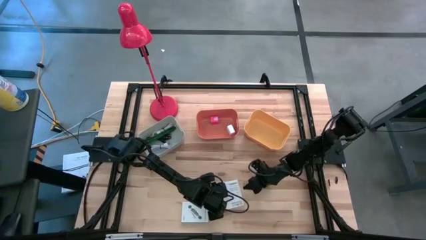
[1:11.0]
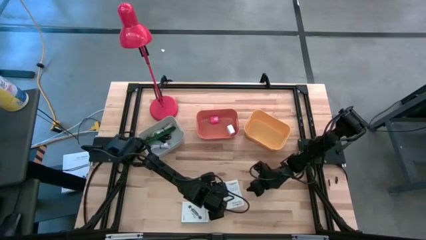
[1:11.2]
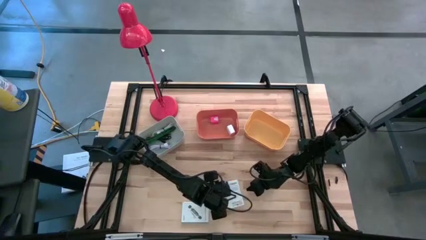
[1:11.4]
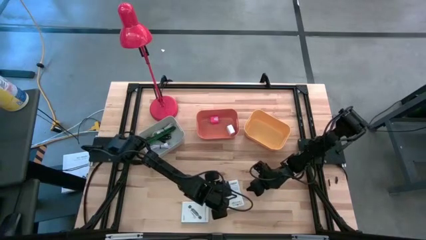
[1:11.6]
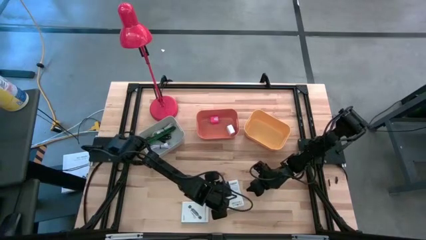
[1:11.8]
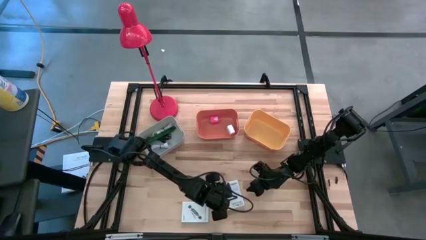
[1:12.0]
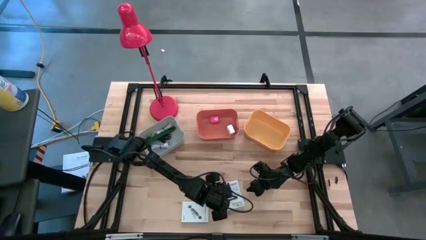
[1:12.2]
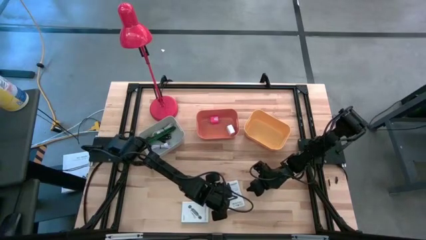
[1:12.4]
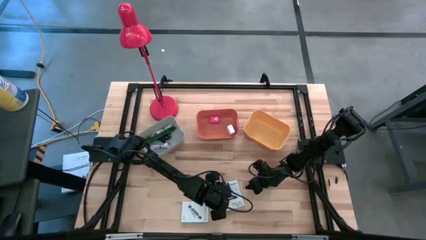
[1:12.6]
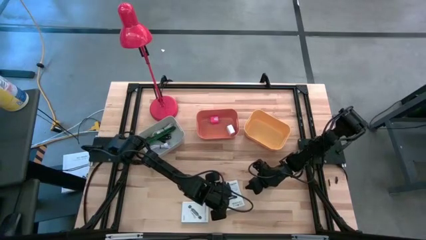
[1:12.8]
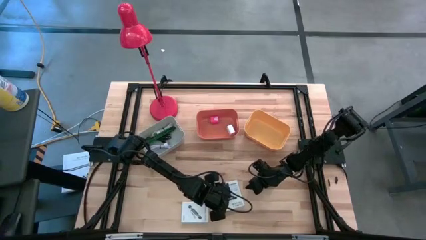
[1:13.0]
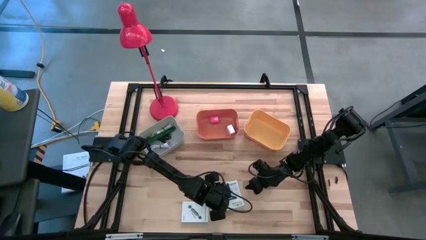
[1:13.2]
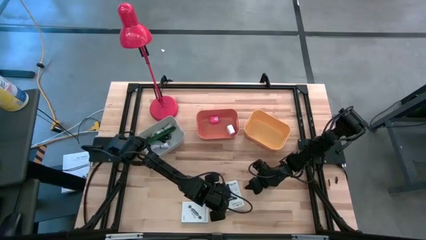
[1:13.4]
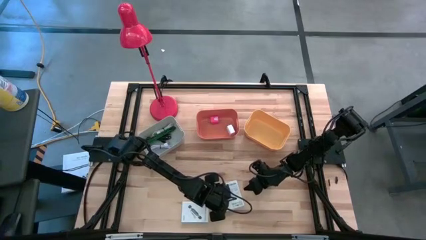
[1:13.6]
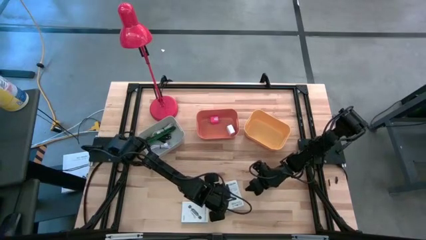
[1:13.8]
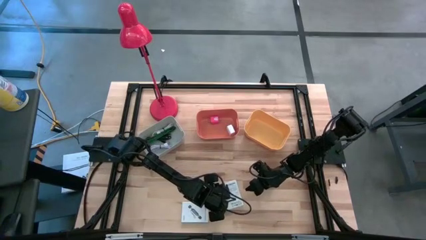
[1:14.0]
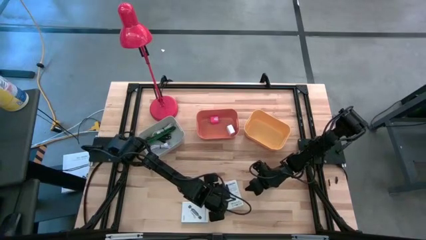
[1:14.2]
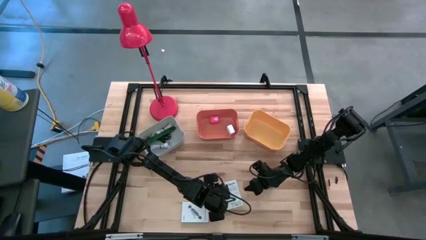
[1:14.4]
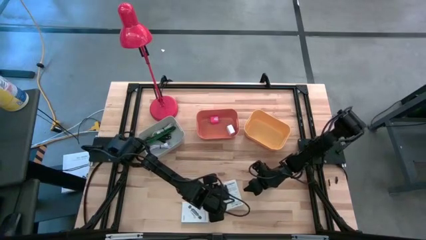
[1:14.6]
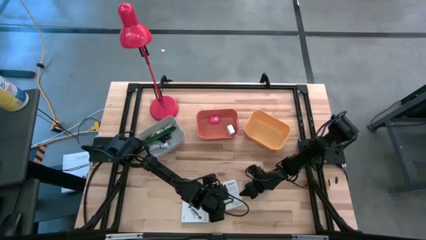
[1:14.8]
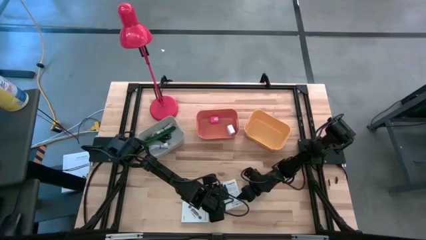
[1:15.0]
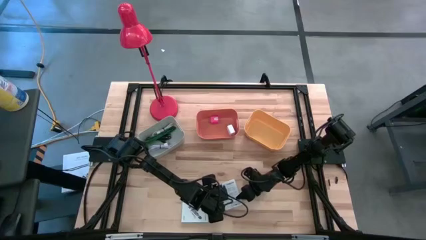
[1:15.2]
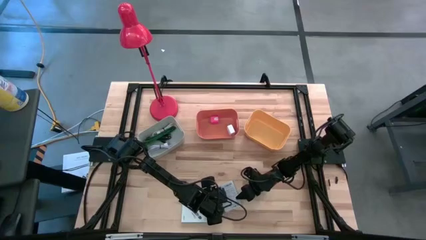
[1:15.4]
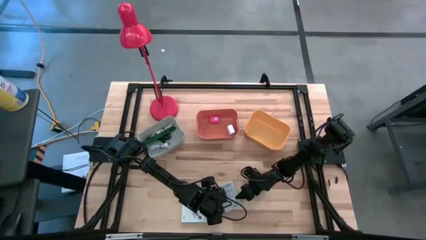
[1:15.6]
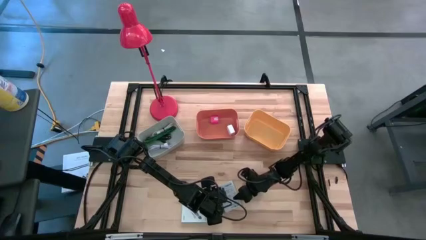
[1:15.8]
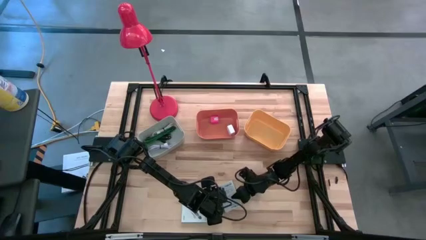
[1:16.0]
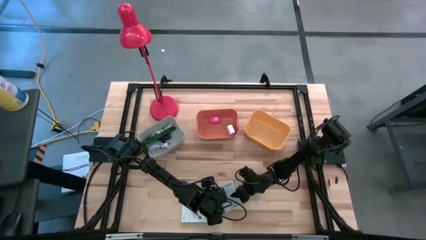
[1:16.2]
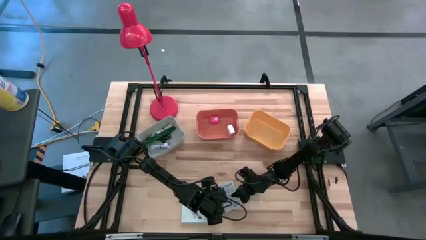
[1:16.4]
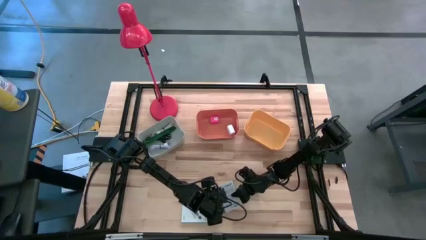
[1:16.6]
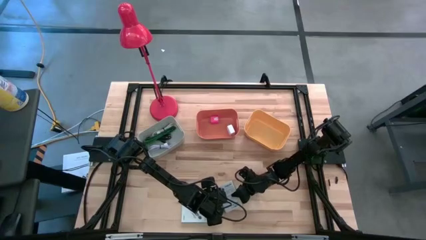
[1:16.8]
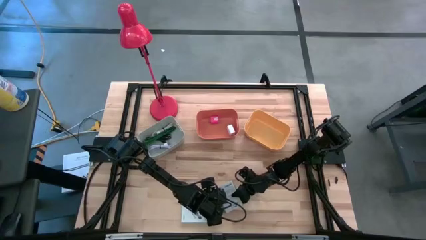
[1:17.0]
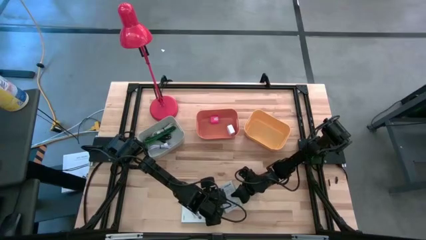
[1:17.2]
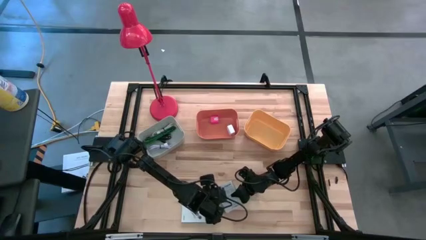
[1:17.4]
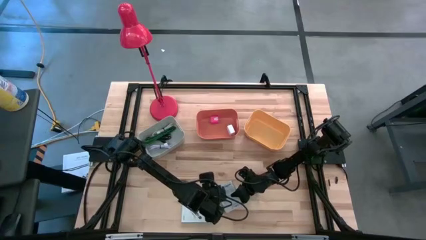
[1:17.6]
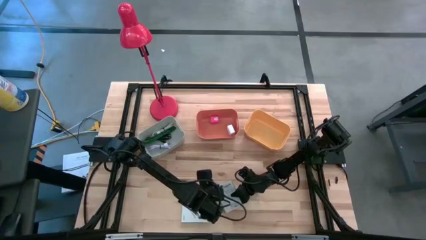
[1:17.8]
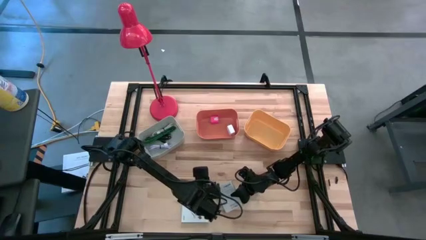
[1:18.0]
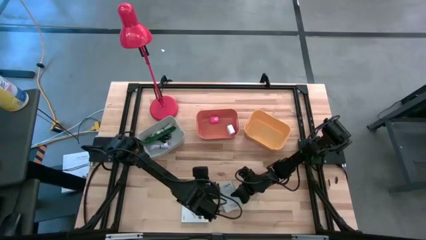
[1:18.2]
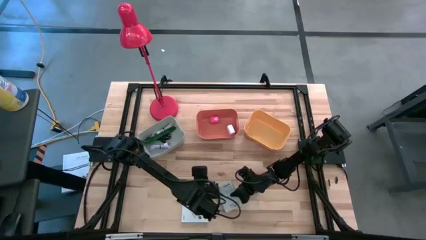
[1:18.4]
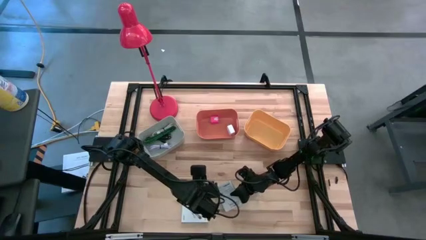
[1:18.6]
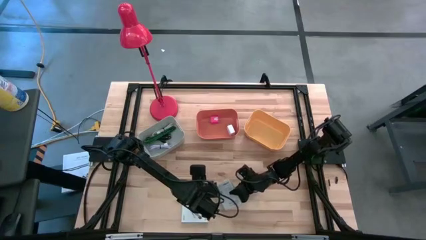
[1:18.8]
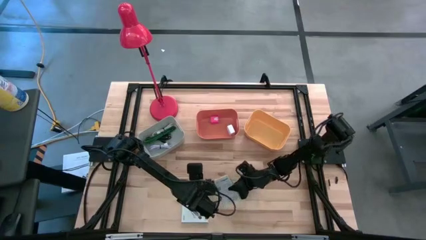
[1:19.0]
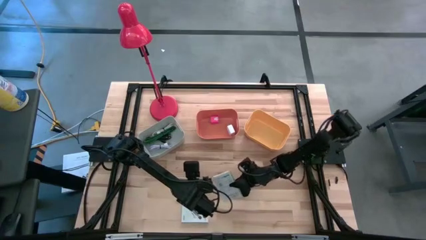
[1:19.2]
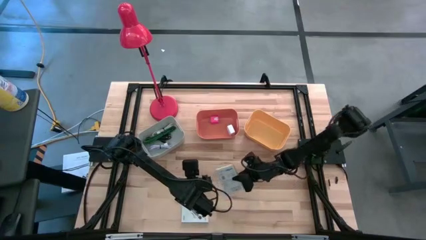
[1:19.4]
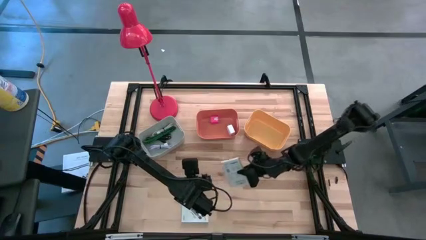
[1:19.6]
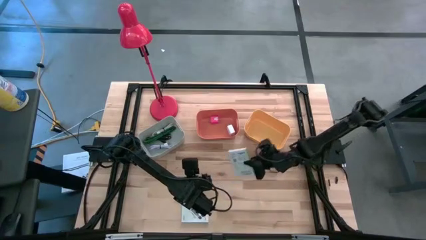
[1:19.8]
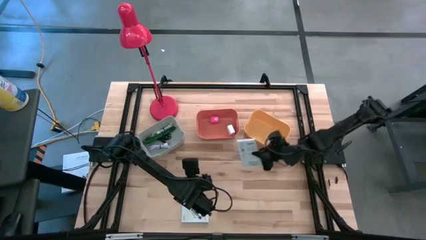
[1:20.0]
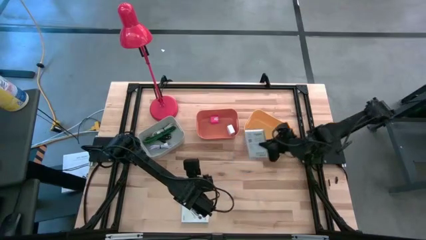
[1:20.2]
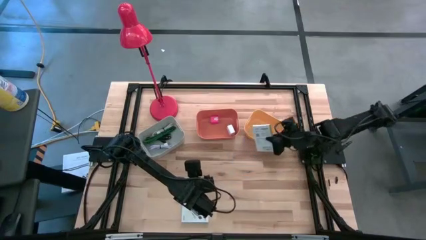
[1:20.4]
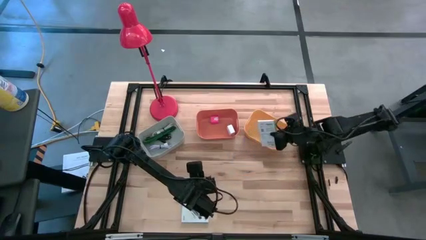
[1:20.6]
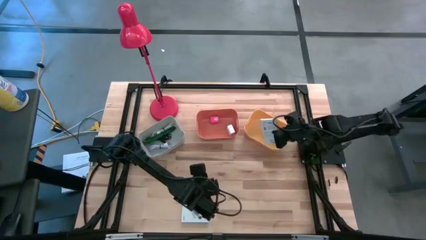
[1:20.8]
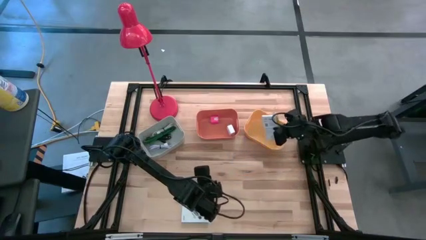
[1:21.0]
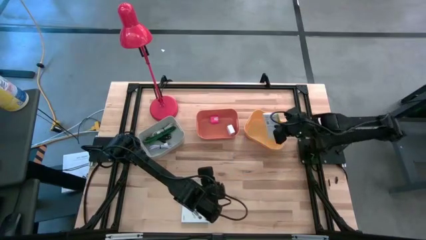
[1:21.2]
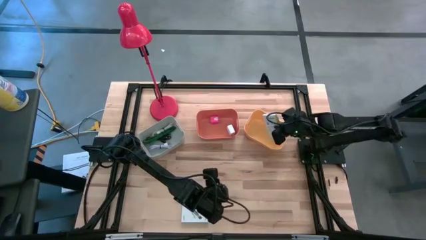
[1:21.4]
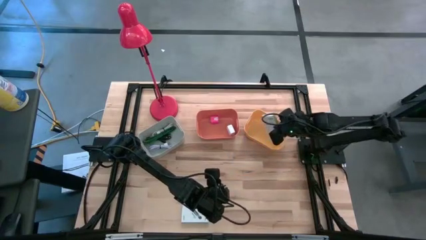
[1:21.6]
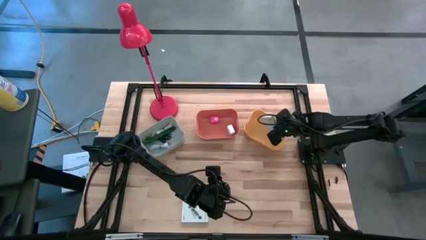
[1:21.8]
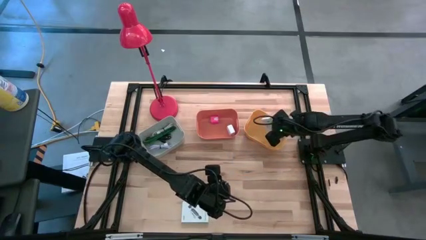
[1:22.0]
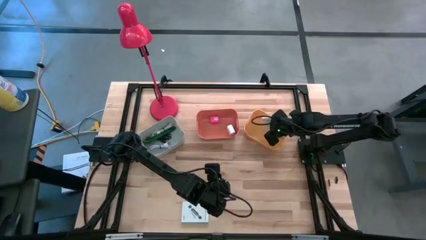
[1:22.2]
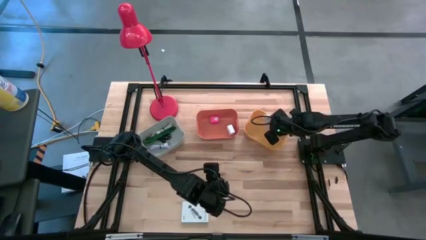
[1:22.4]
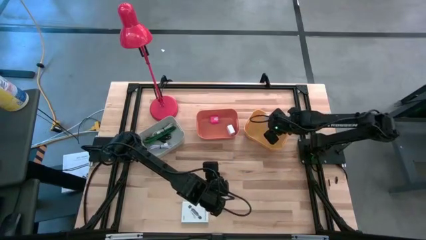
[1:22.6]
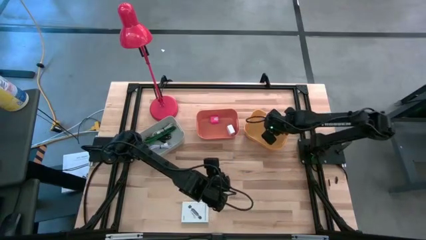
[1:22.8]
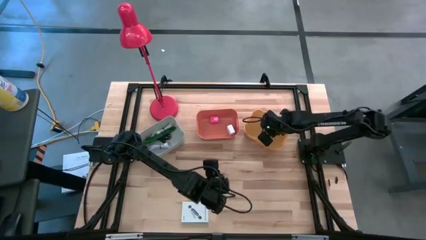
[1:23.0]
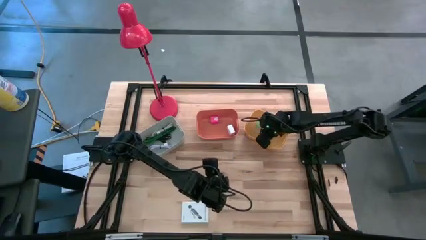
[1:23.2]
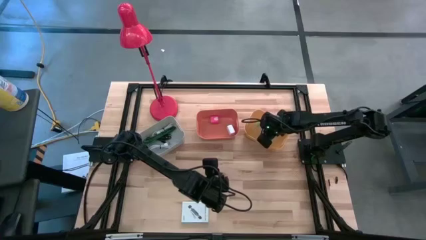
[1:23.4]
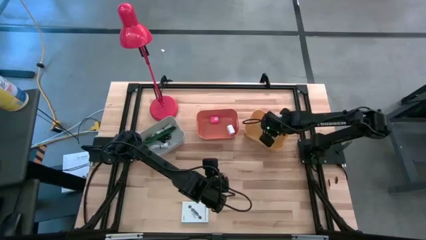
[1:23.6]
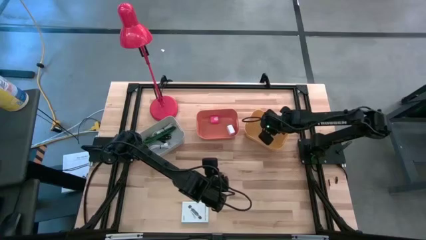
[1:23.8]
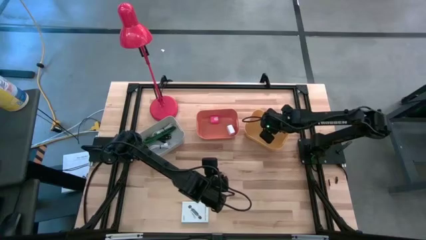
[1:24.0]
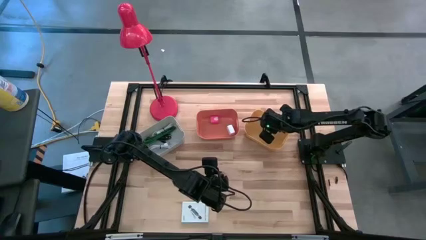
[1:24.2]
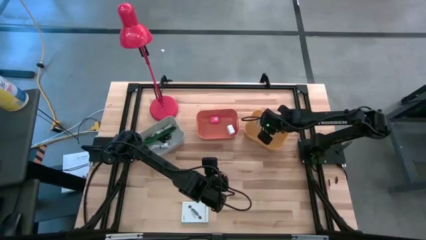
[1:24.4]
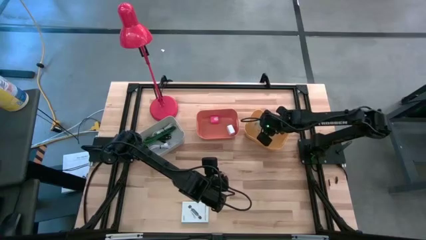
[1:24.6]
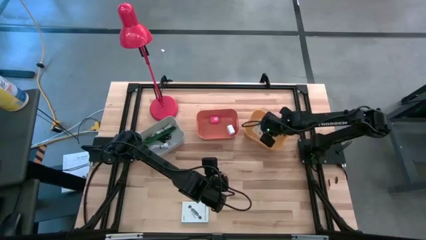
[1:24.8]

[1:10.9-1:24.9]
Task: Pick and place items into bin
Put the right white box into the yellow bin

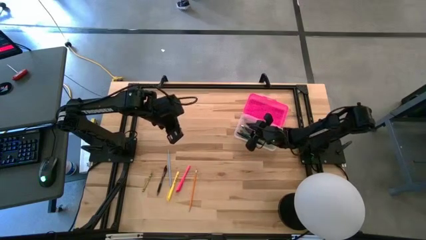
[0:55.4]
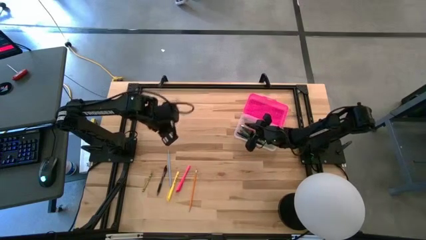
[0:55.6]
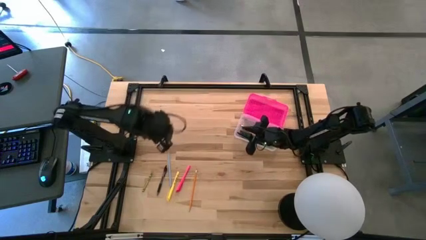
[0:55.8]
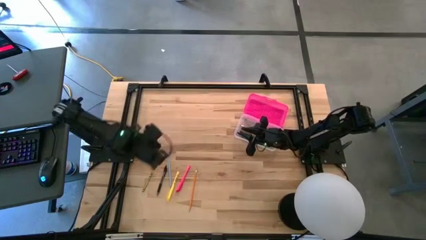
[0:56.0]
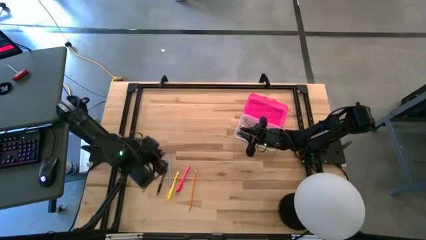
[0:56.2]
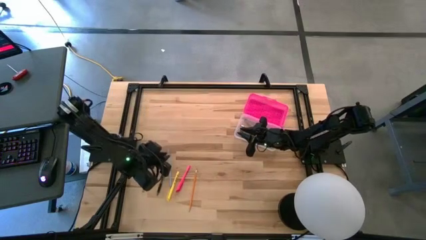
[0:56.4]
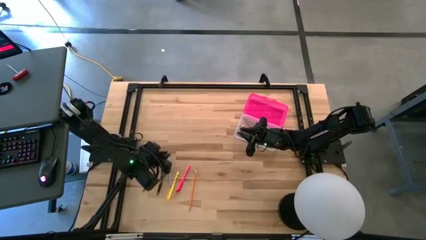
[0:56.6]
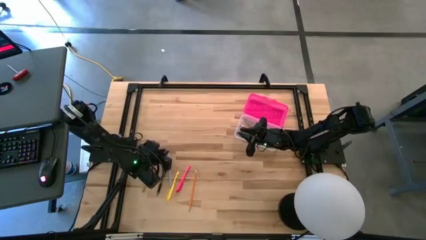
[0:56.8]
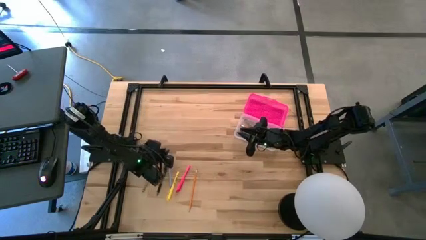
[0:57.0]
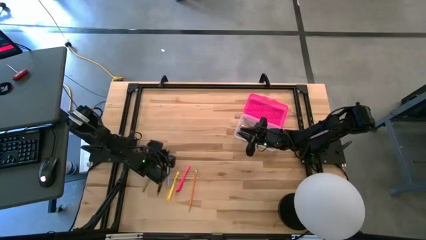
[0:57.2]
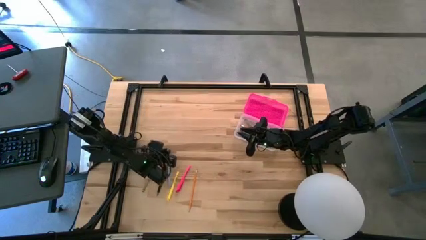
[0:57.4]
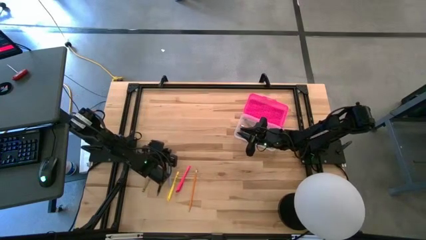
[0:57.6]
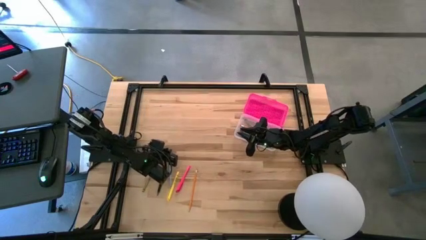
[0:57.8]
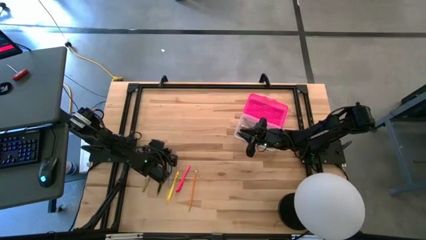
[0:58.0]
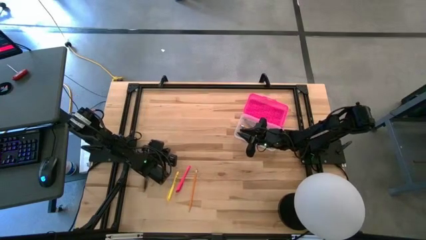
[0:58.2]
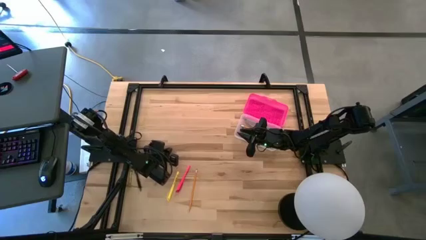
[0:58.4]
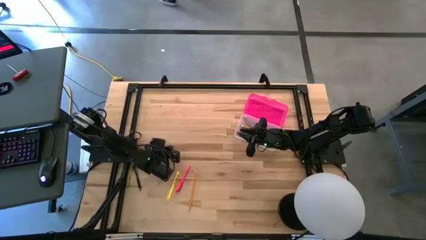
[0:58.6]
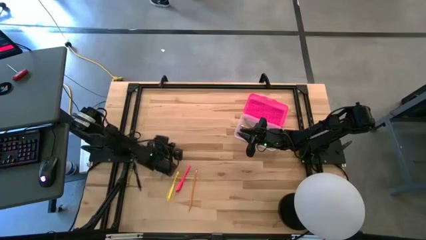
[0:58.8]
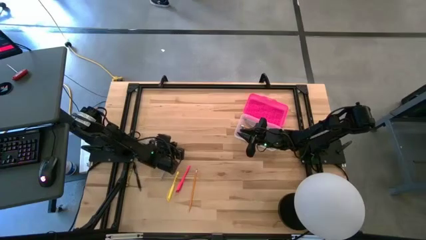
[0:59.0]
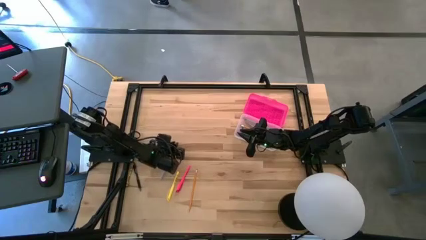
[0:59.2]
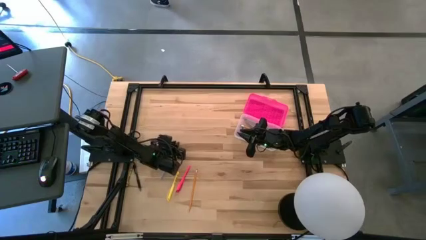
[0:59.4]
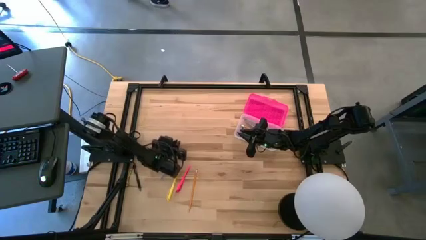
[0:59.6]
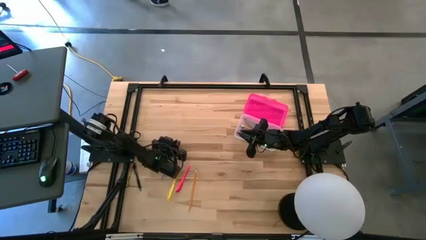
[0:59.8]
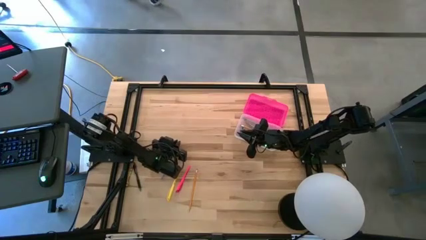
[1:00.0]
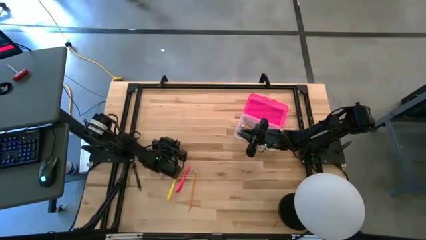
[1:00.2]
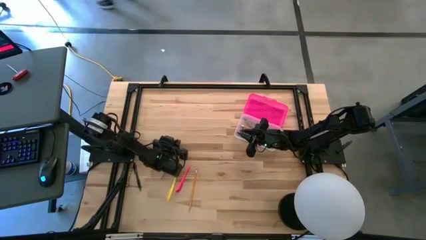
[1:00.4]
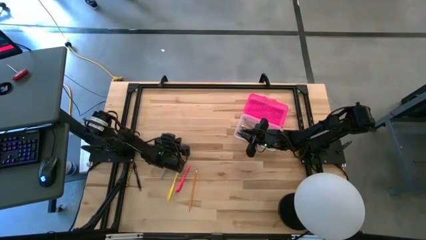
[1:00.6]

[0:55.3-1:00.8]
Task: Pick & place school supplies into a supply box
Put the blue pencil into the pink supply box
